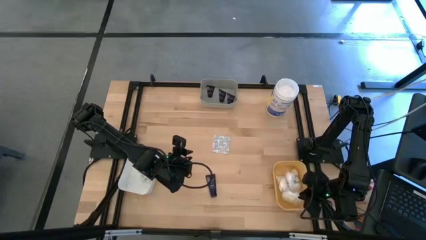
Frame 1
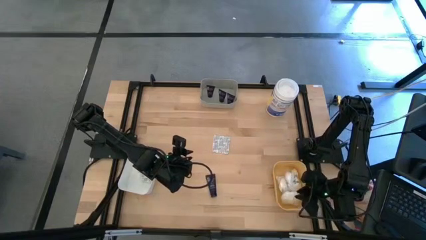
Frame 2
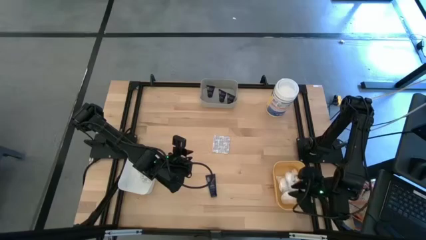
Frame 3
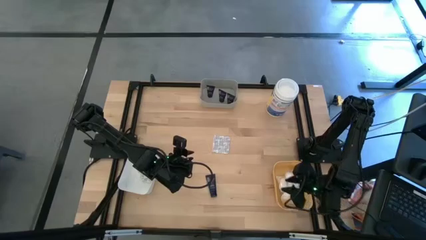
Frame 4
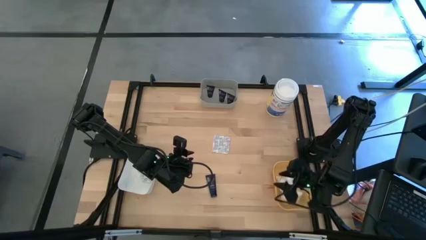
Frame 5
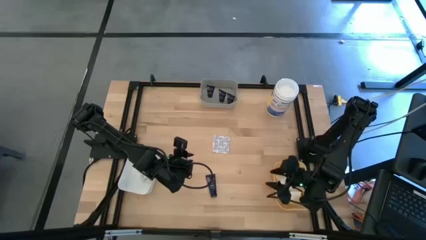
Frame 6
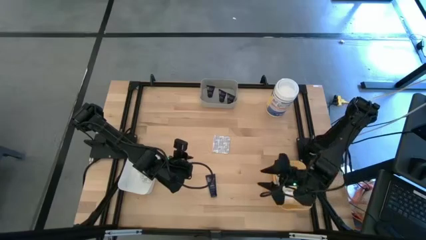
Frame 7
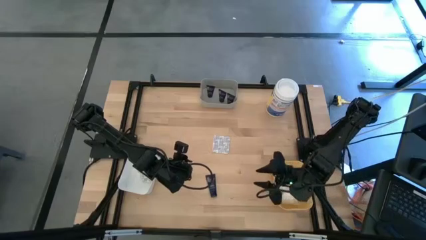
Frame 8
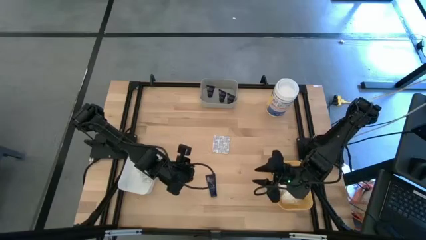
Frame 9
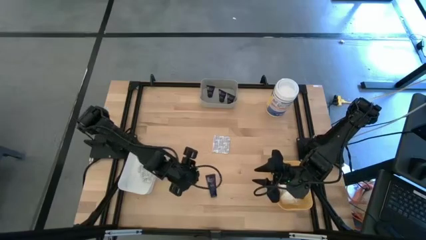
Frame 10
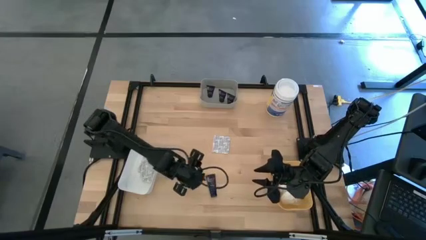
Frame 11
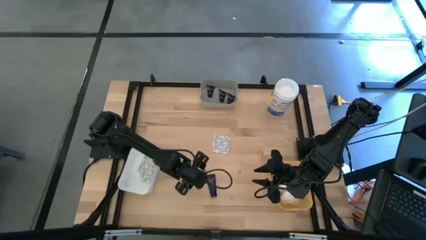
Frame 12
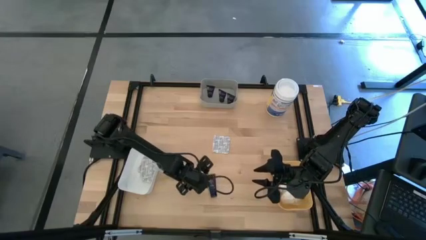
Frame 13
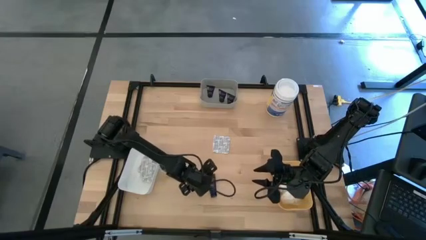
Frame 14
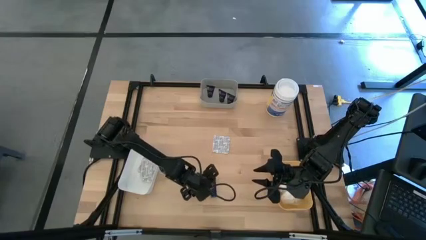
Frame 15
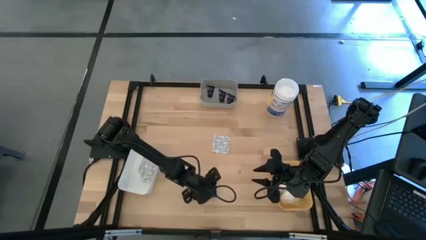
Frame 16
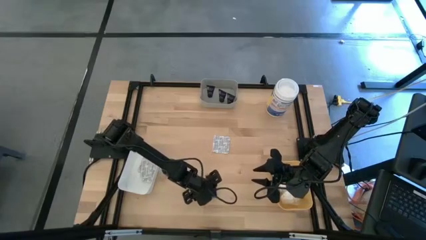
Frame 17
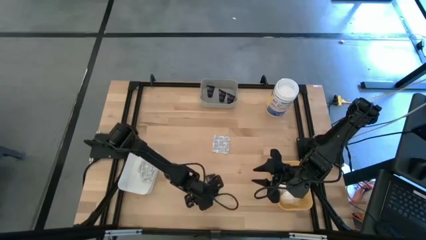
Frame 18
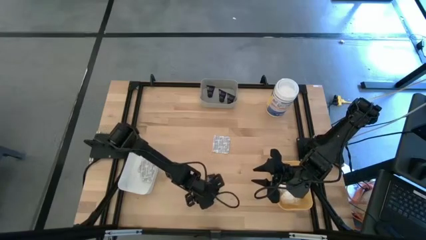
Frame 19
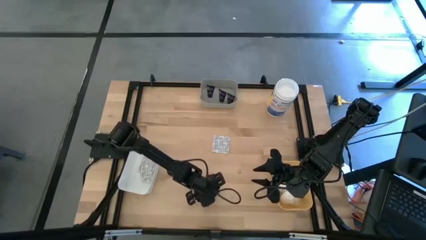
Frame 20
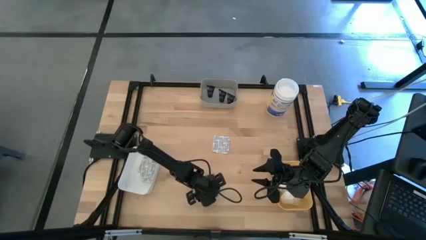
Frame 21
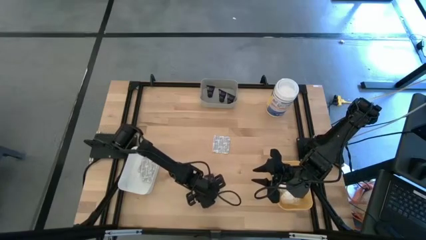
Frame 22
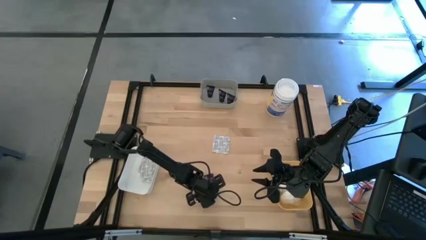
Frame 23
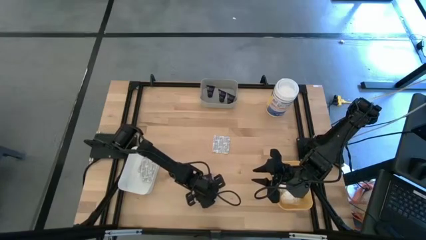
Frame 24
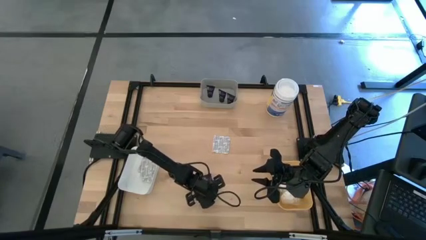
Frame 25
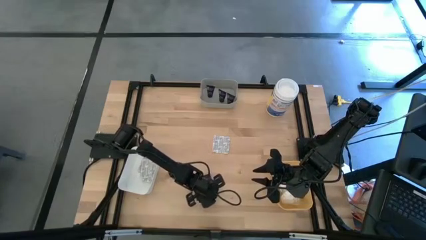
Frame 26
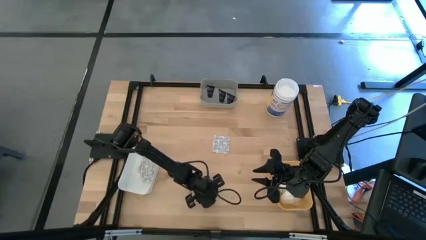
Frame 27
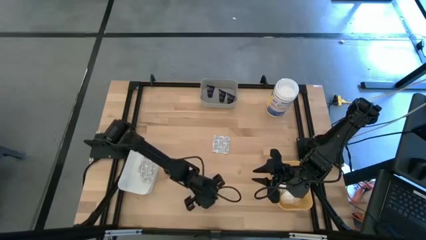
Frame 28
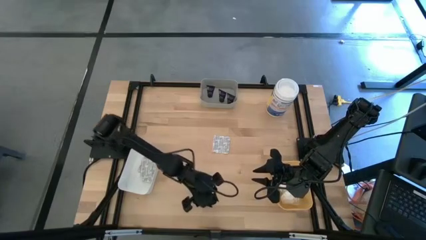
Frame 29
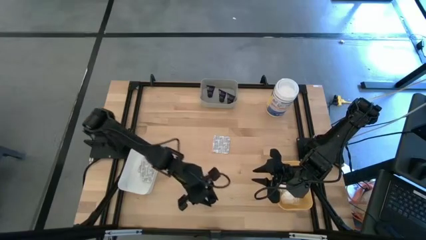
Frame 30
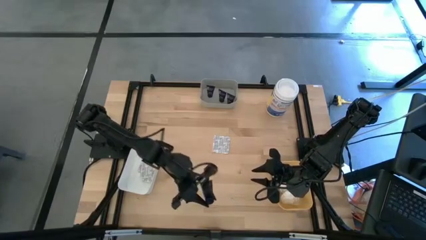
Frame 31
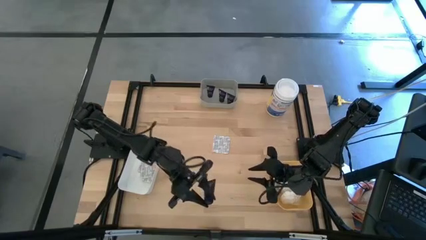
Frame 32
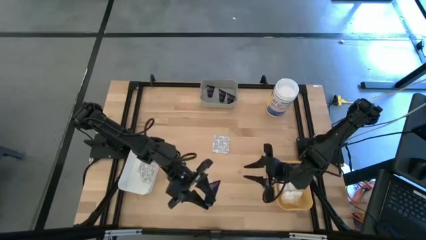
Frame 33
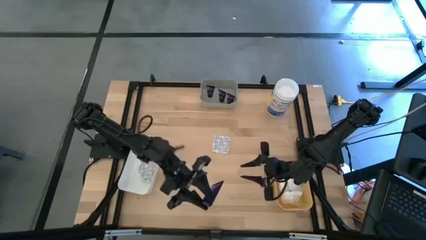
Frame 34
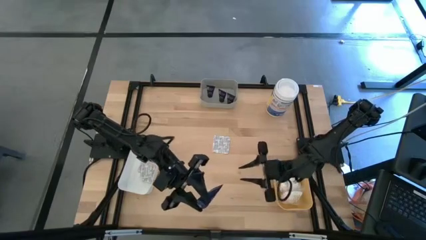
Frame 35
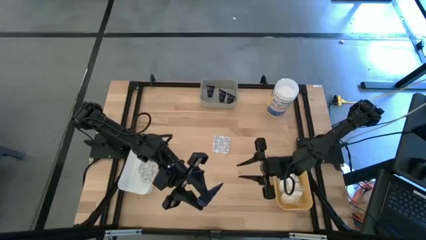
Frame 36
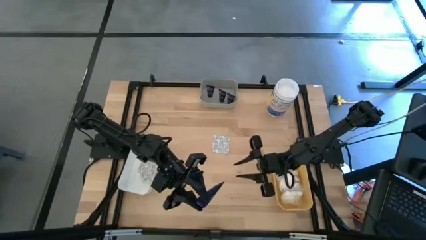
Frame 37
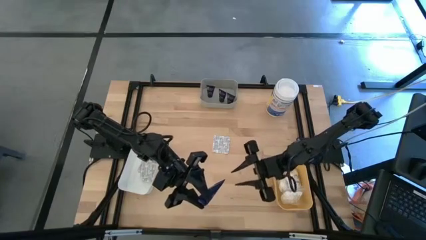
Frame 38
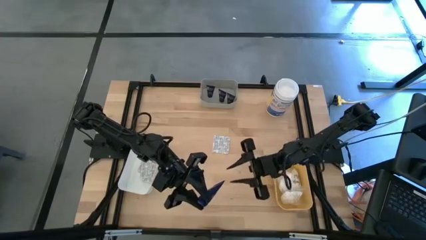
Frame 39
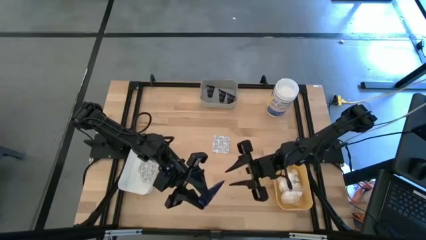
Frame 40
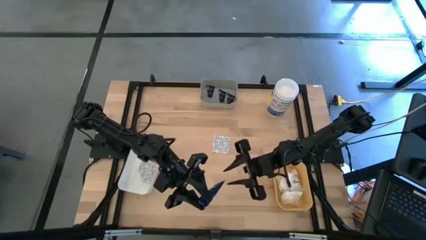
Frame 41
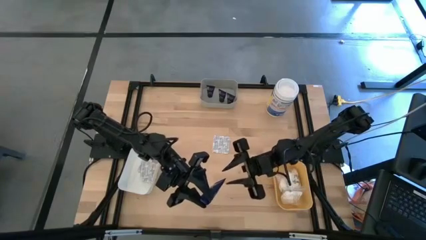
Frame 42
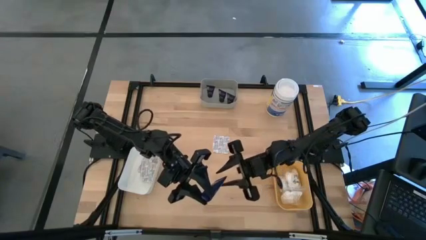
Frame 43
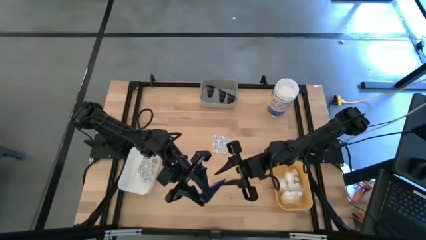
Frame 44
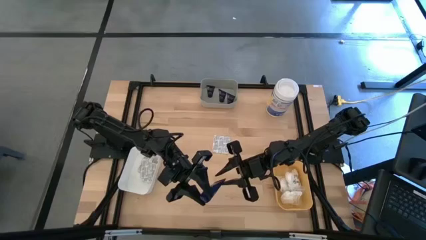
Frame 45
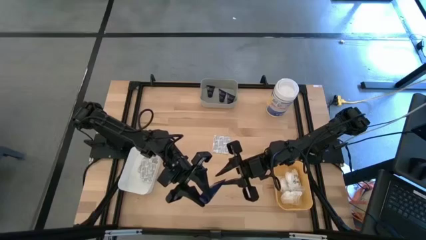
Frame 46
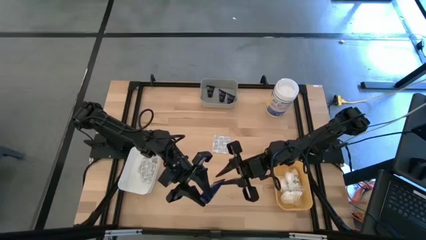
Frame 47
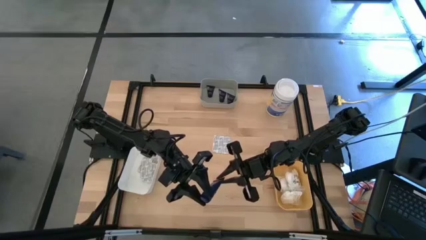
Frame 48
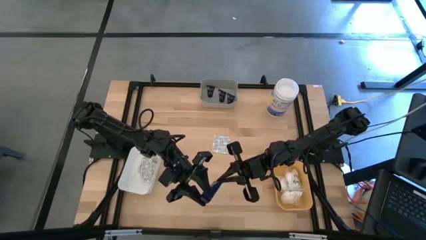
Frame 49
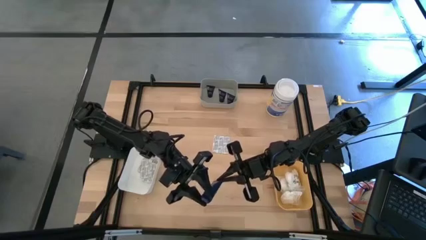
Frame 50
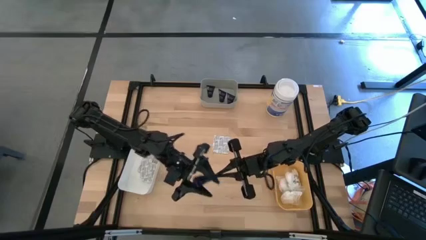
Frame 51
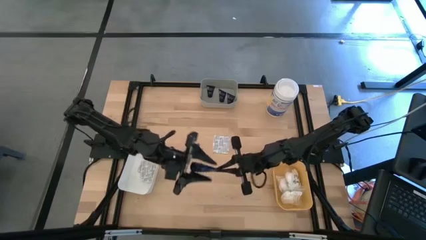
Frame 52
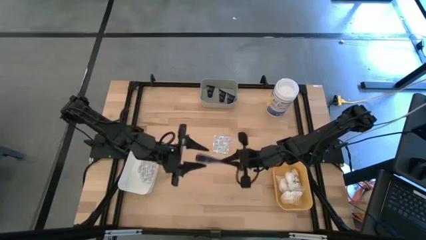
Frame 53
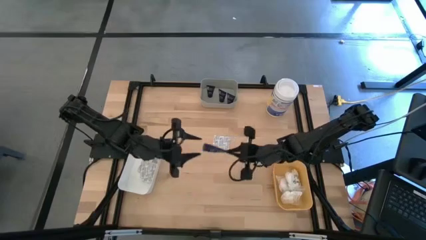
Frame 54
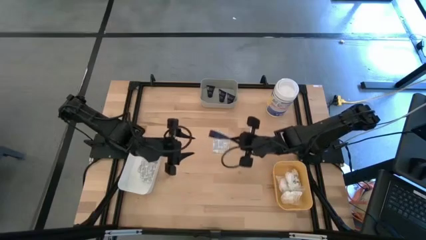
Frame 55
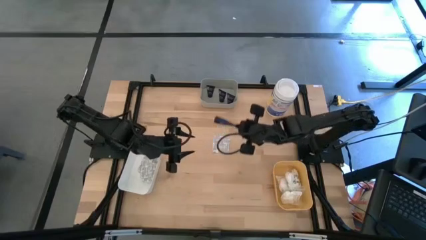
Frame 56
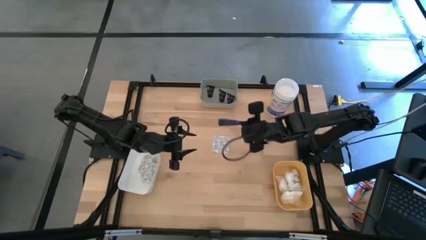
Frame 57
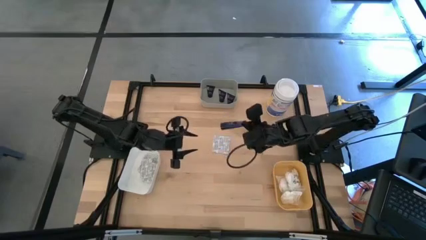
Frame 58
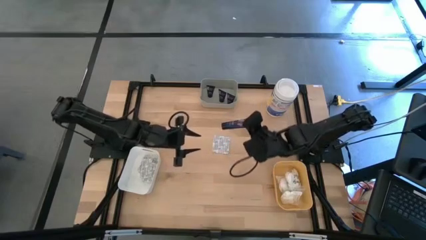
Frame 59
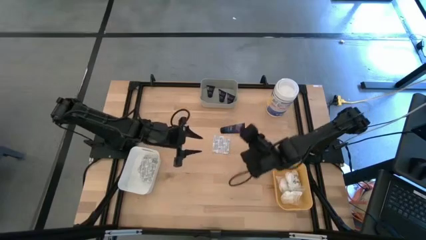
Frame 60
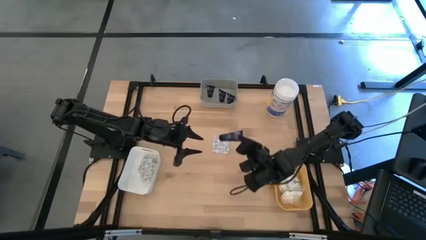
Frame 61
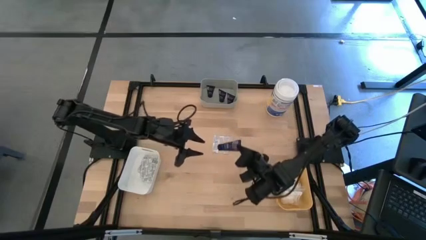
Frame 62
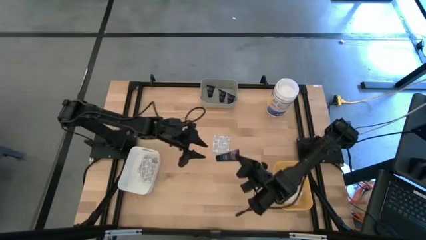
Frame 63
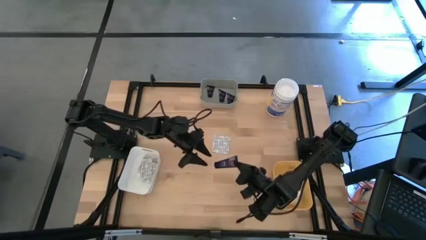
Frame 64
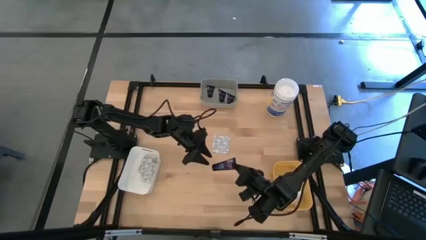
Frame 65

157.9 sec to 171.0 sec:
Task: Pick & Place Travel size toiletries
Put the shave cream into the gray bin

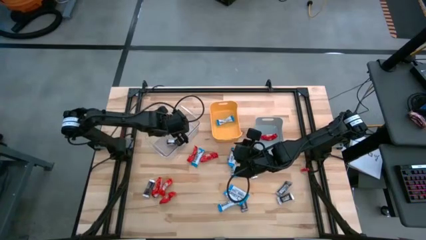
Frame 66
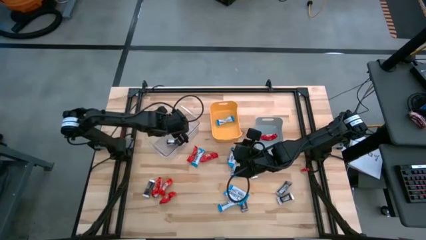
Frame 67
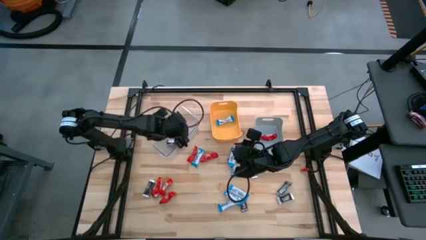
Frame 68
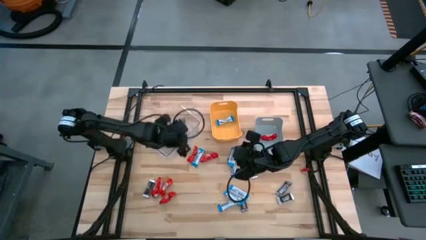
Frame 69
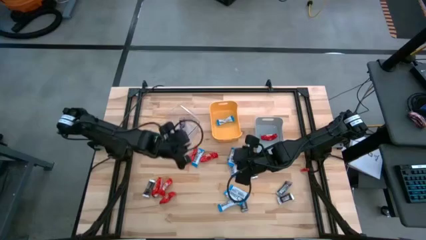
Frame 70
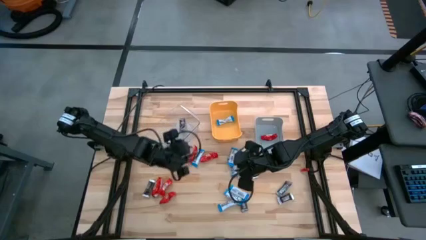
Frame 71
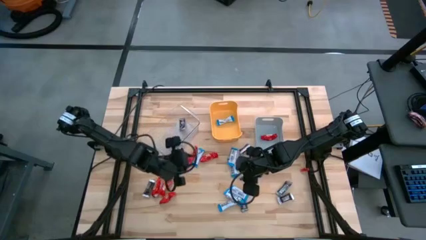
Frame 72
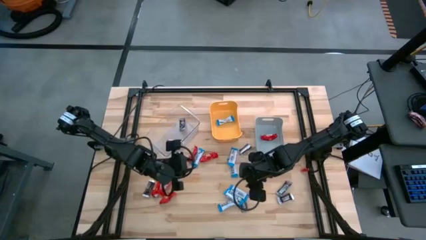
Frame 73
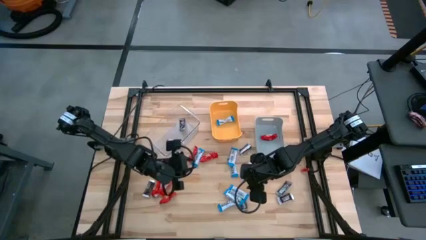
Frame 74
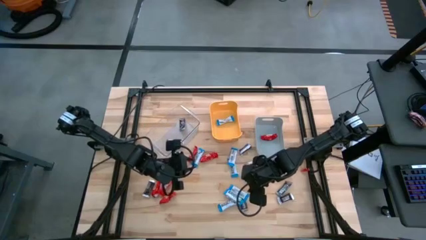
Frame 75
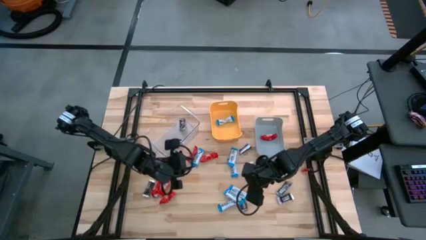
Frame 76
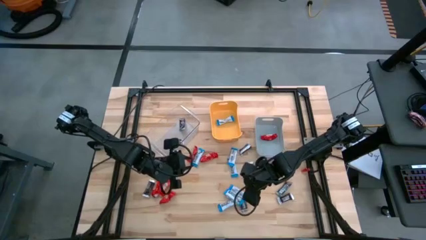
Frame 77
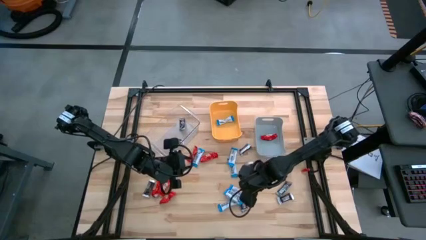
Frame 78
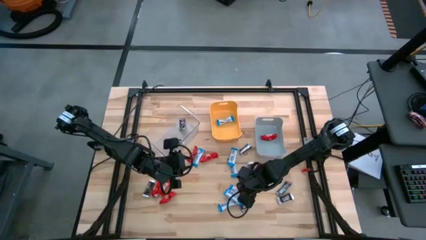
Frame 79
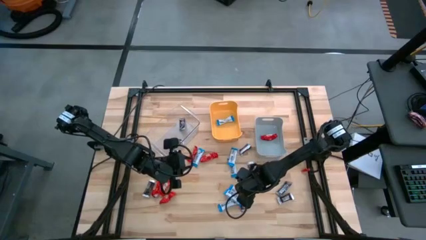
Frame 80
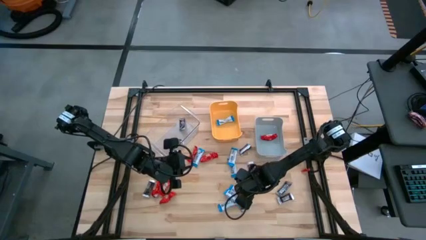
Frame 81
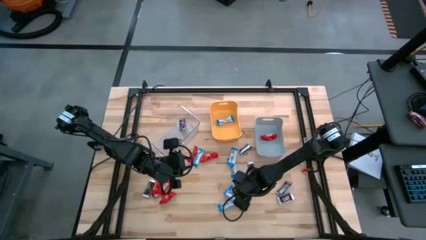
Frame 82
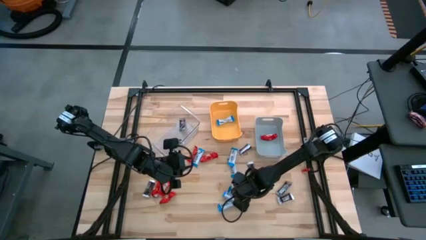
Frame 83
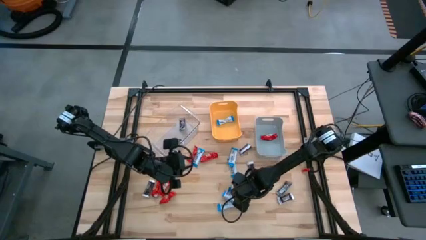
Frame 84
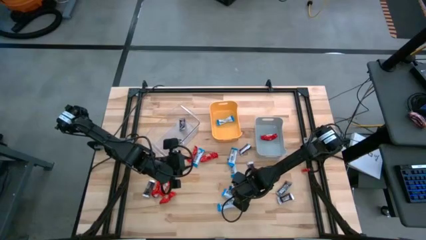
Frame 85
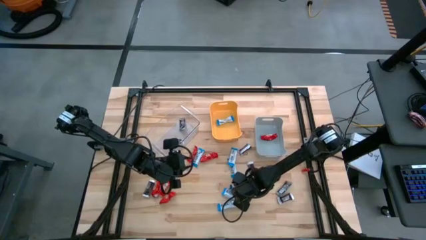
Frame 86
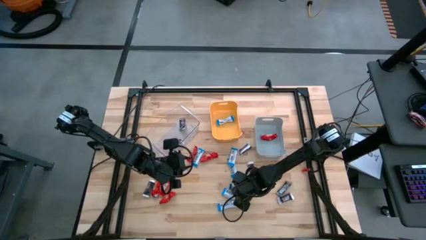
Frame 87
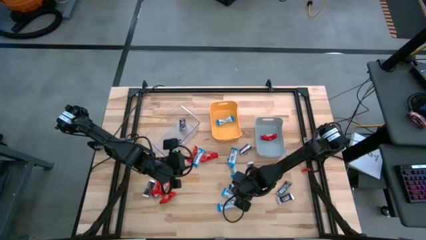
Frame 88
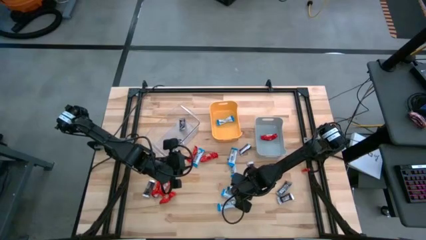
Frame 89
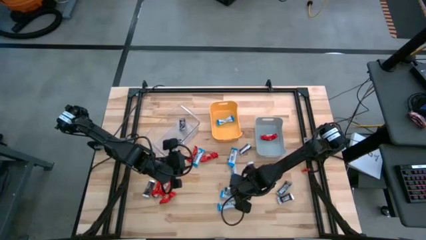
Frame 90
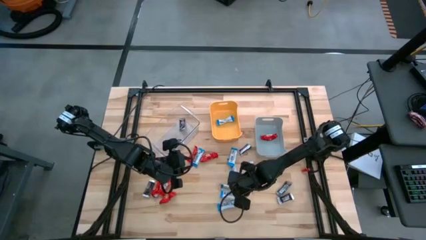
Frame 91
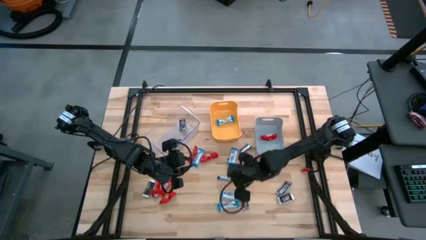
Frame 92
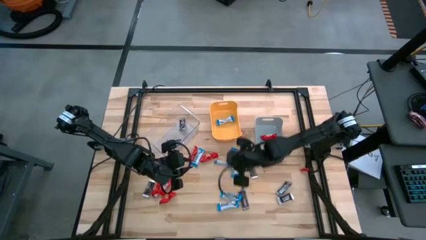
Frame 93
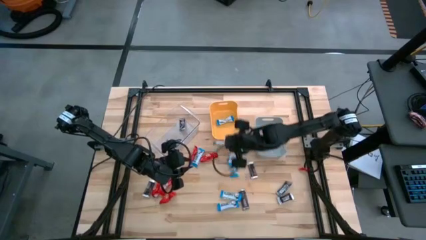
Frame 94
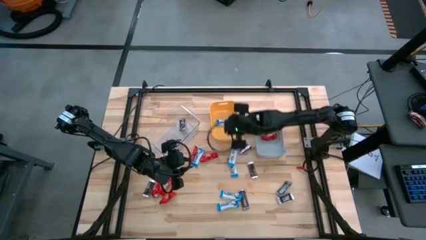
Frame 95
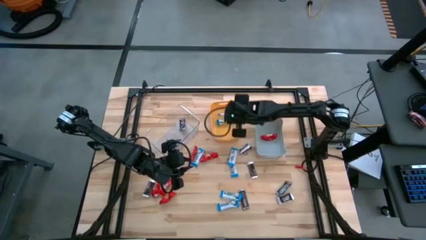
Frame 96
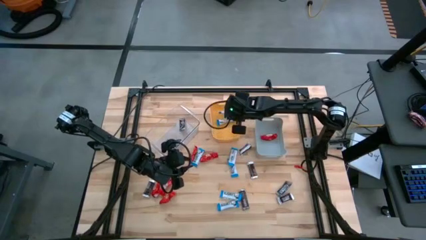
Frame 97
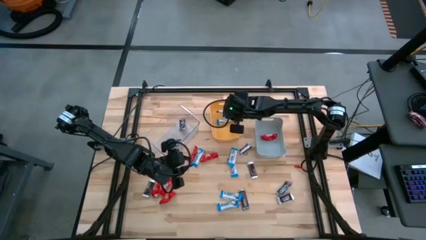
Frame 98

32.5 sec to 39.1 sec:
Task: Organize candy in baskets
Put the white chocolate into the yellow bin
